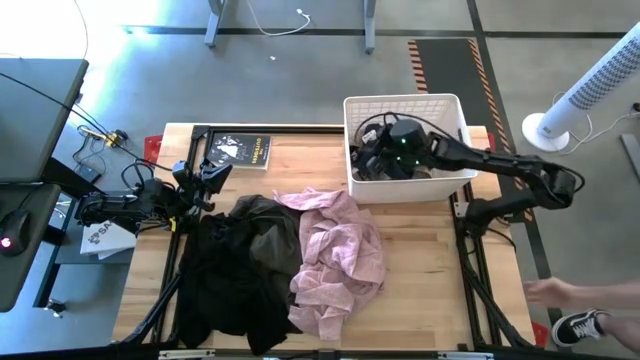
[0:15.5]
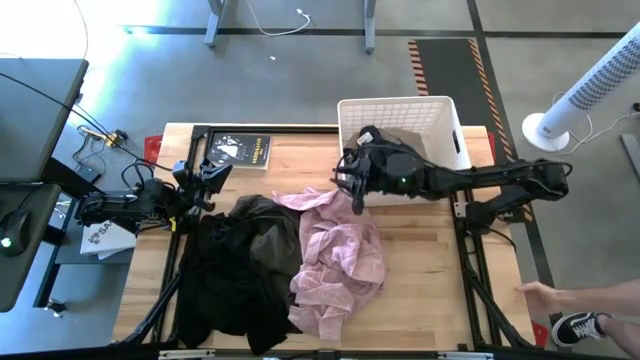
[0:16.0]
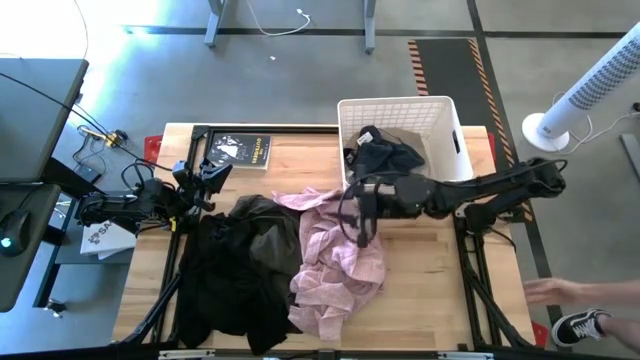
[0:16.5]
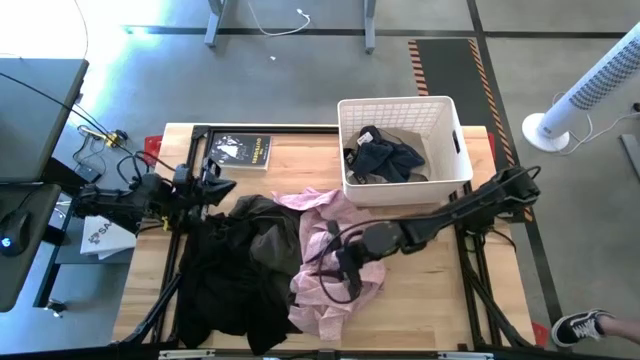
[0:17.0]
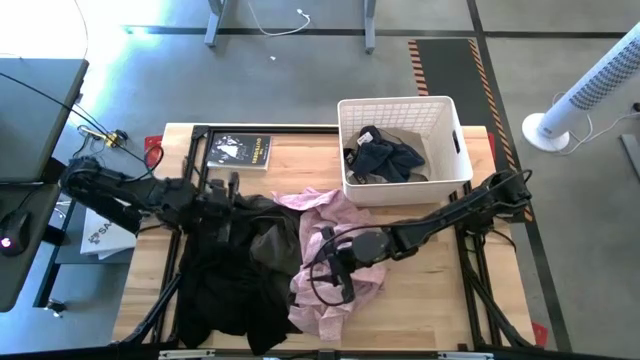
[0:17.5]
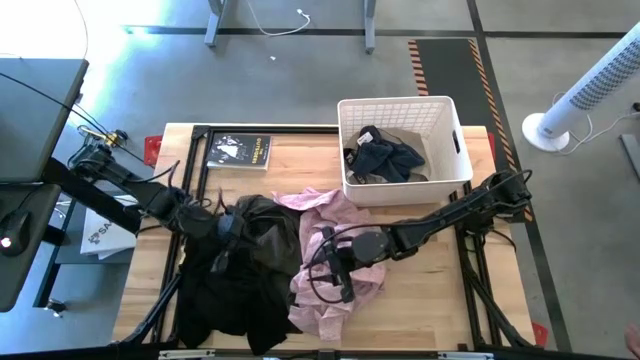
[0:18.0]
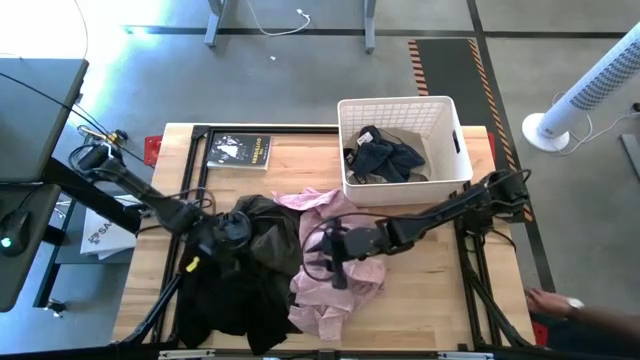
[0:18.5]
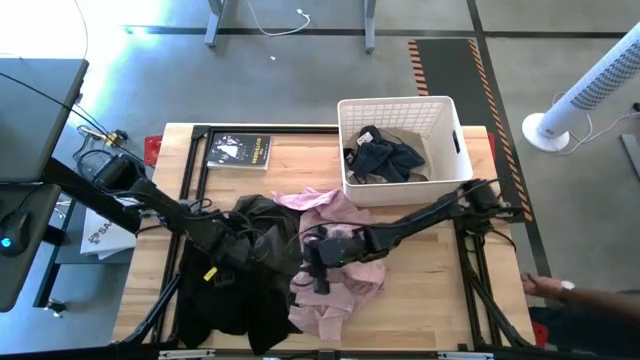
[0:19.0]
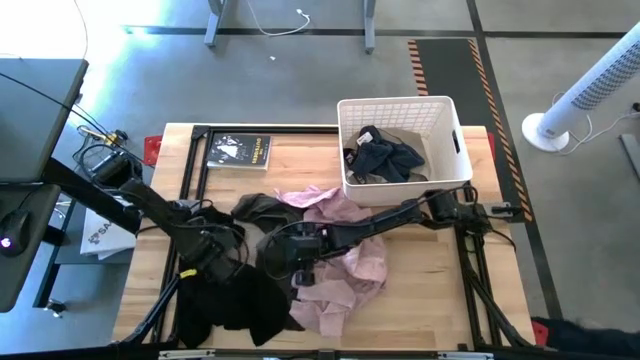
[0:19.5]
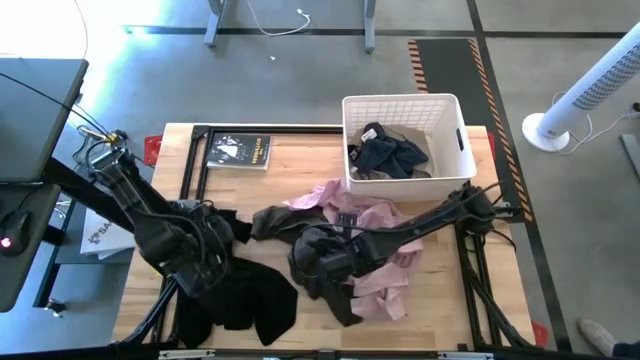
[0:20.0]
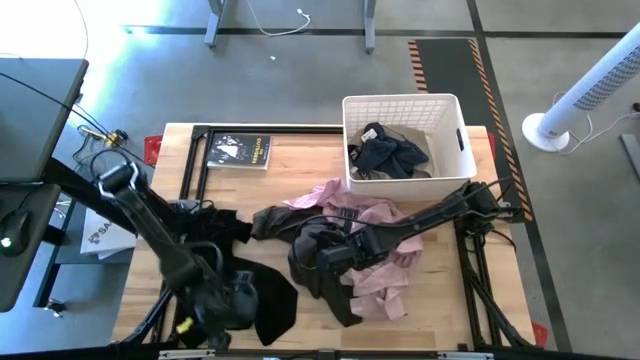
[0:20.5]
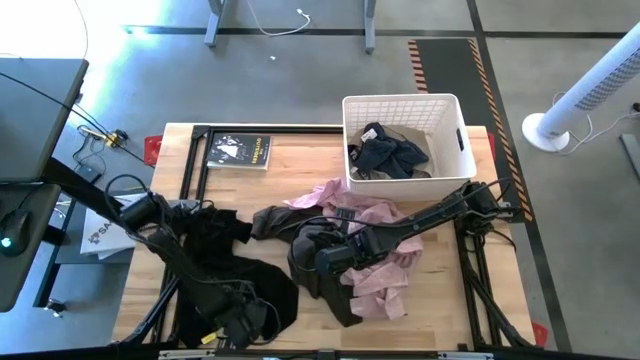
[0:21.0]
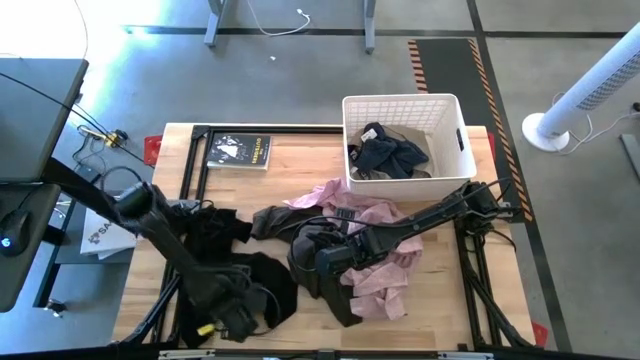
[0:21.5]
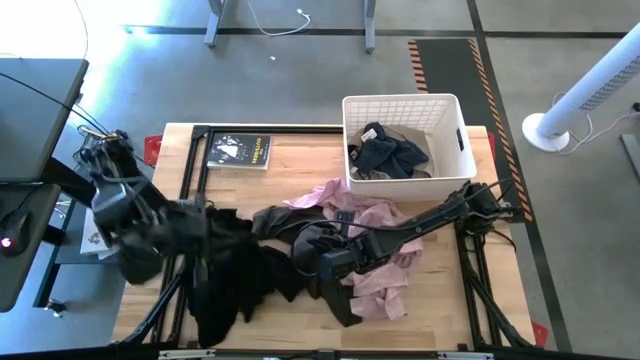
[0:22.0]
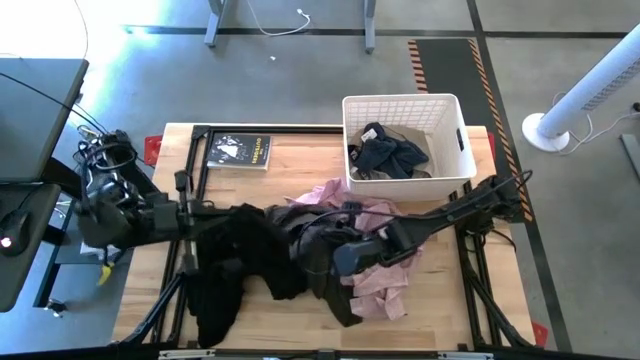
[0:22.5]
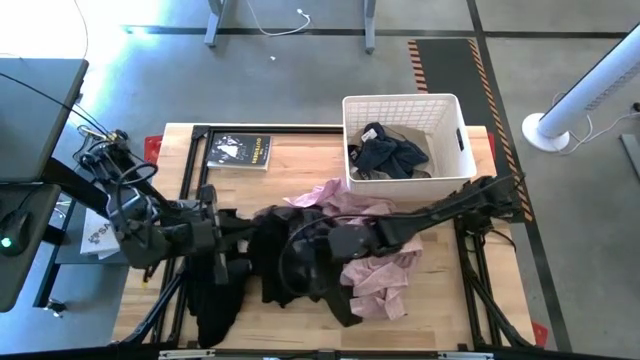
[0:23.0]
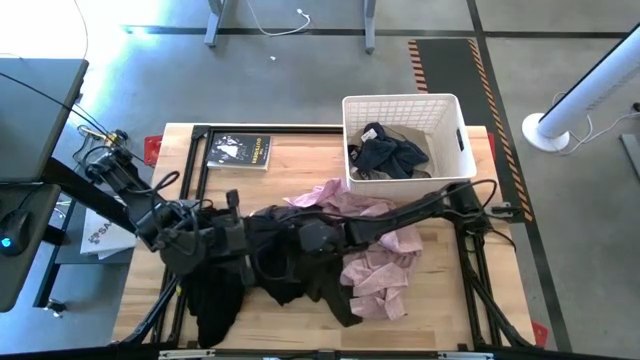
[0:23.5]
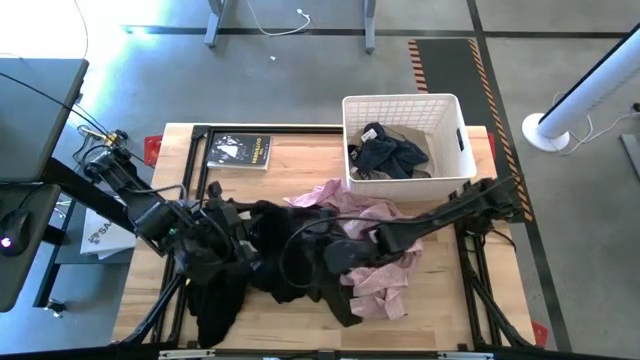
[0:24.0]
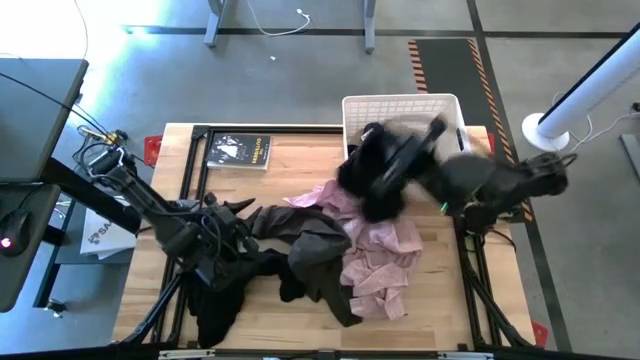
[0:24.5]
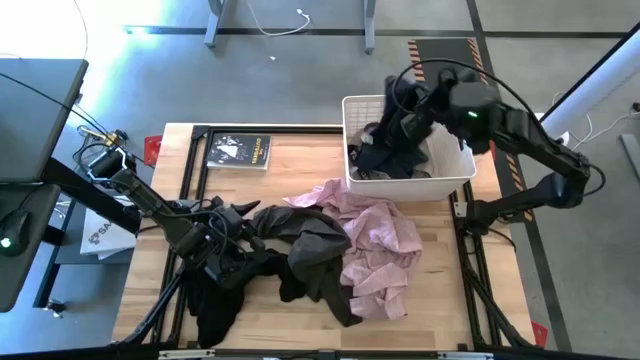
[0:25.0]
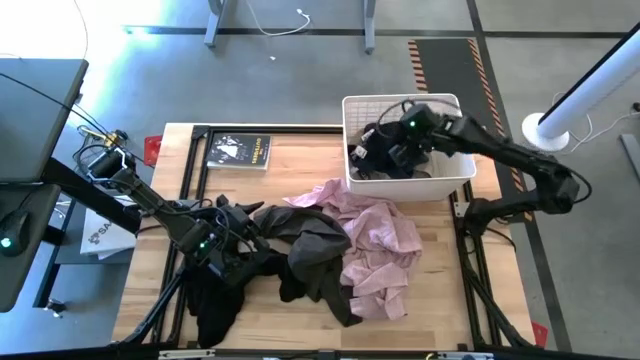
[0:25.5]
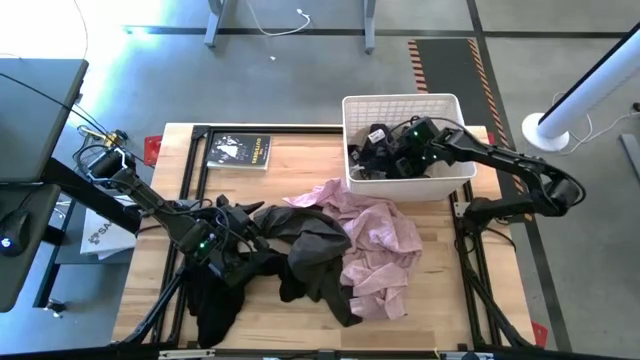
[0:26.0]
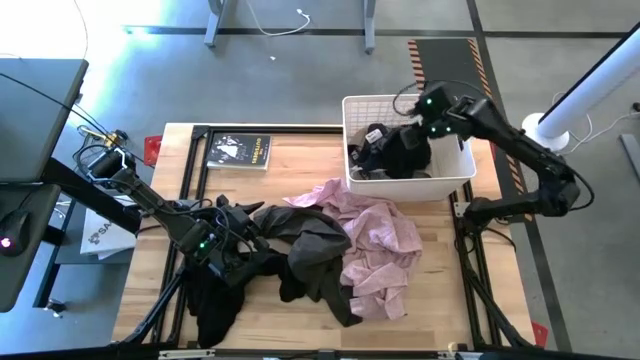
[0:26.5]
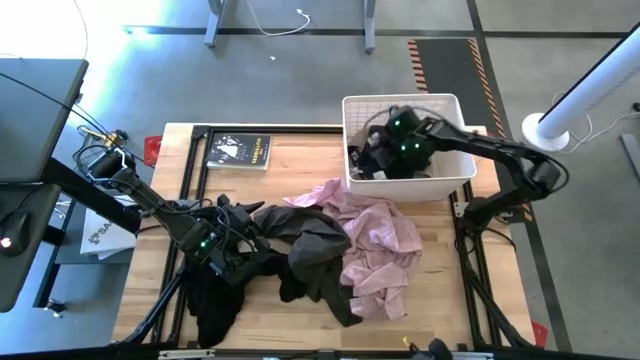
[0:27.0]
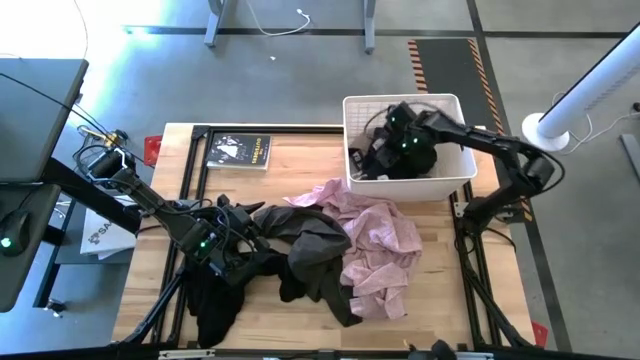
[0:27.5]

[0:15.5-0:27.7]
Task: Sort clothes
Put the black boxer into the white bin

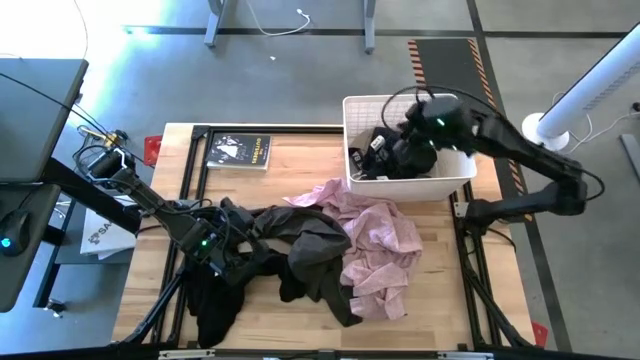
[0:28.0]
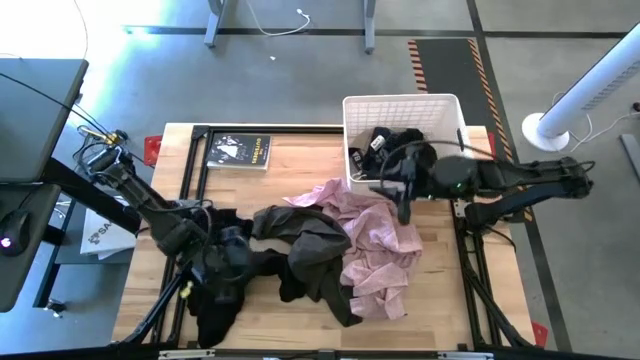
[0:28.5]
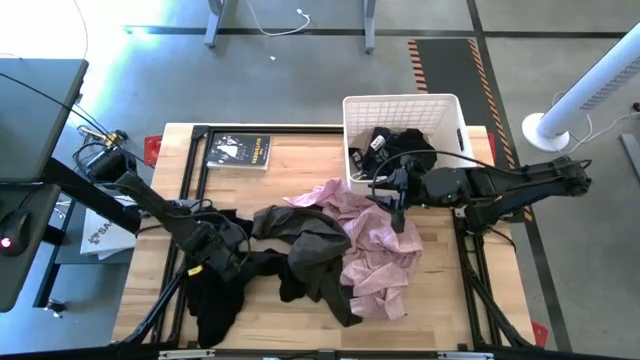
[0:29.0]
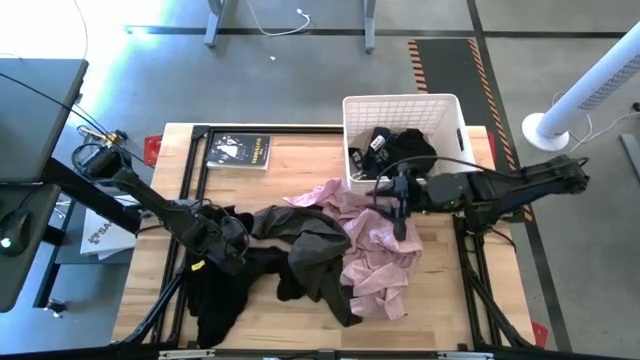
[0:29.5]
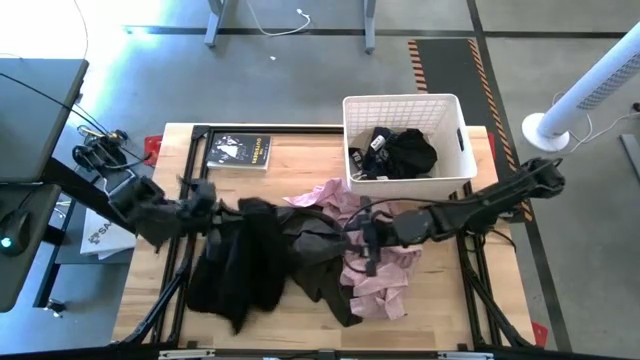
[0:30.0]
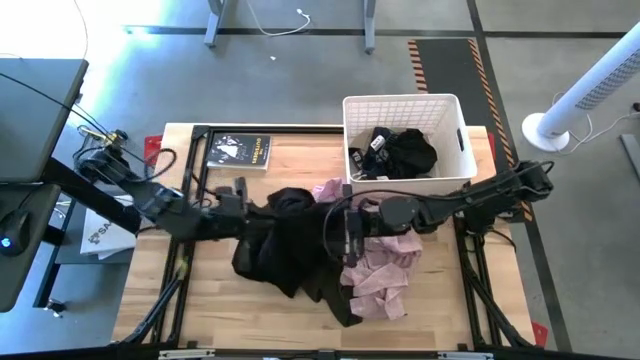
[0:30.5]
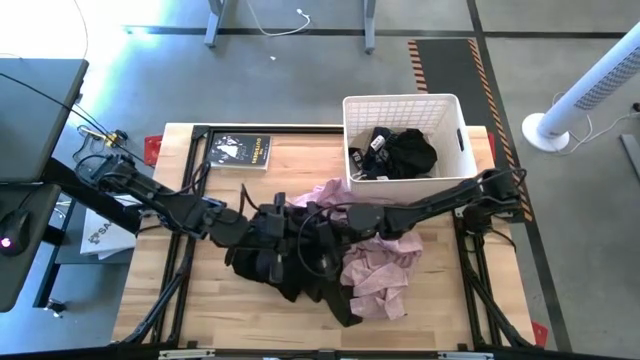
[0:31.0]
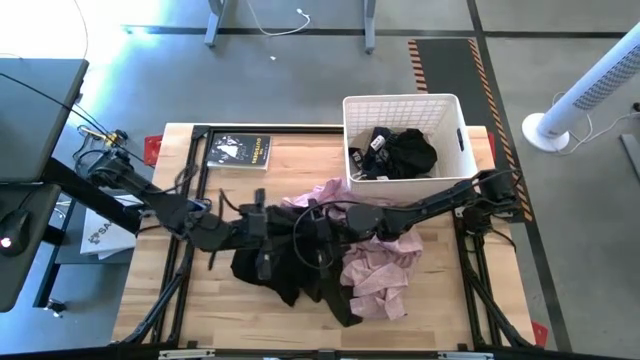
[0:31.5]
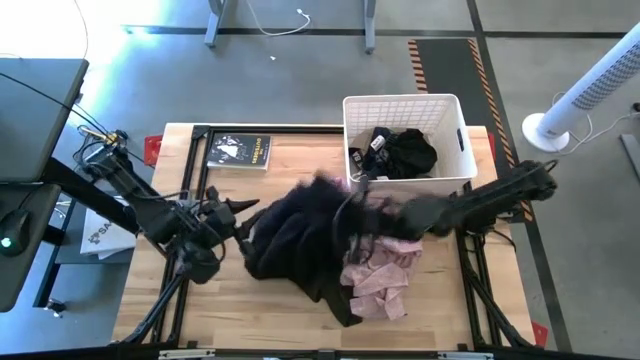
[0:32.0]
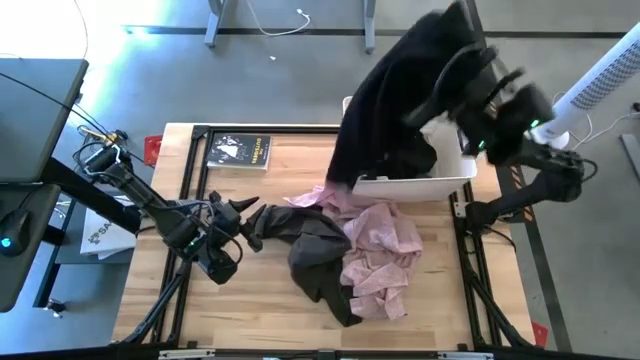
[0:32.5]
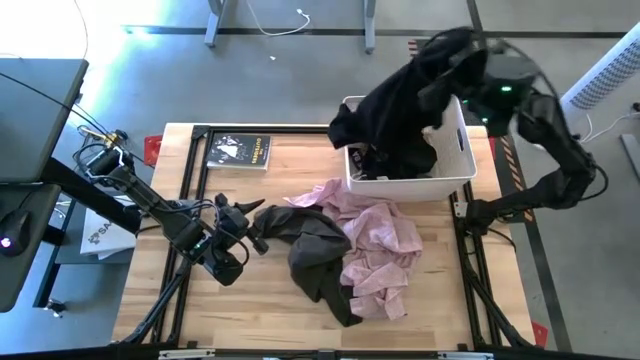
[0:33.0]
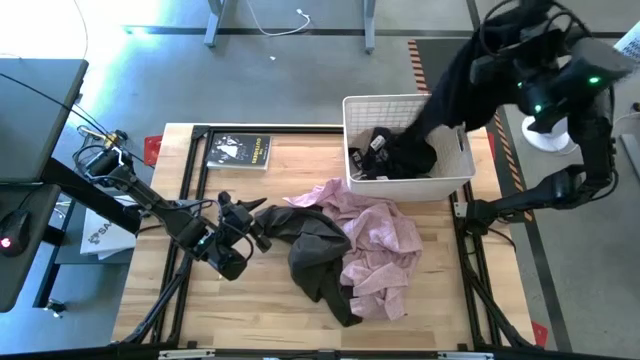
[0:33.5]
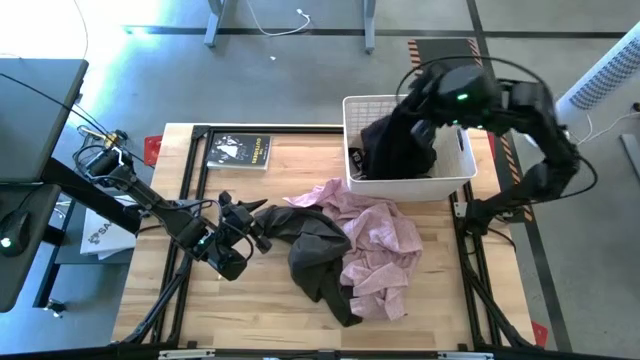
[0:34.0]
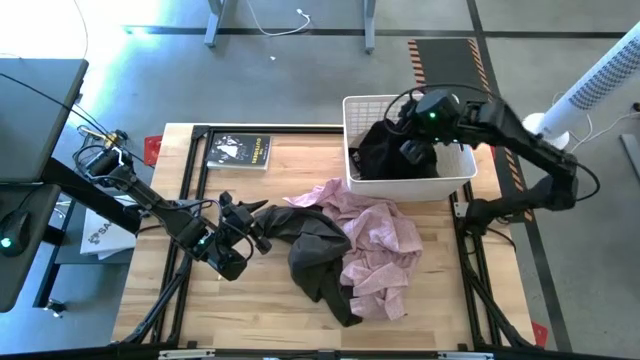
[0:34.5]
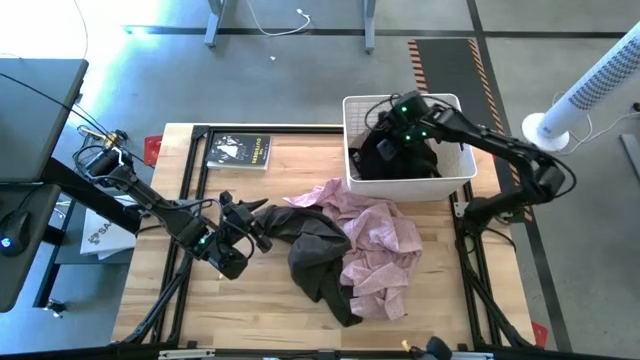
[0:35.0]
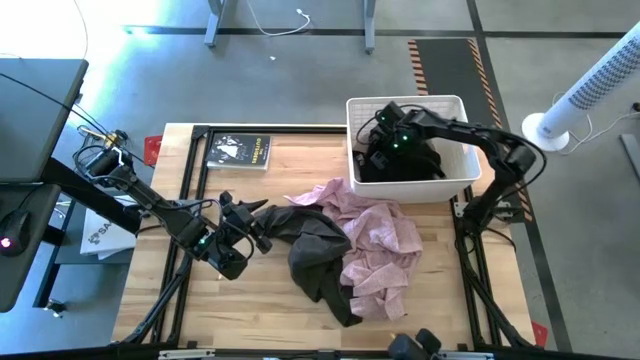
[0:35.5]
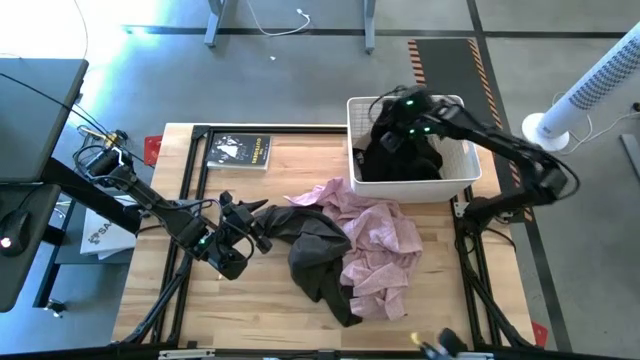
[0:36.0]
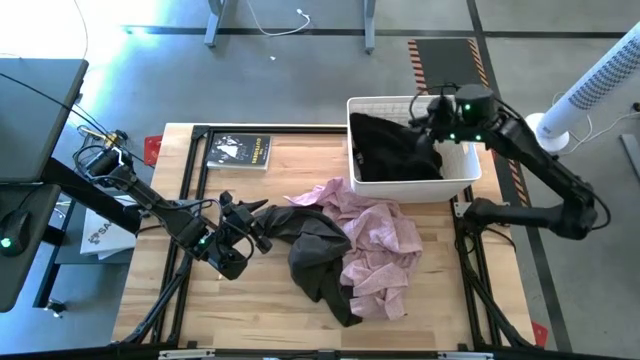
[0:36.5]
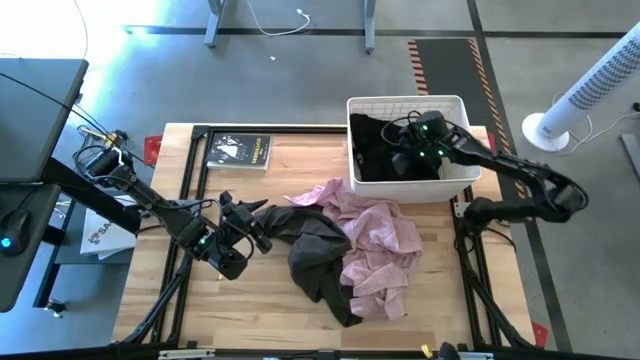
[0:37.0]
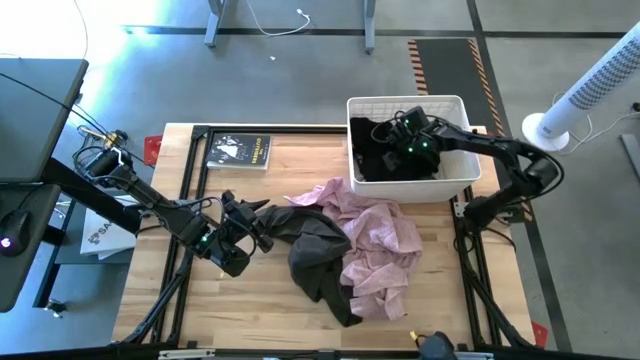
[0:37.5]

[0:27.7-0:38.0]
Put the black shirt into the white bin
